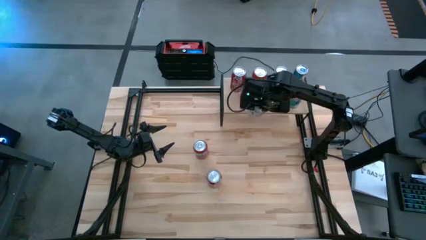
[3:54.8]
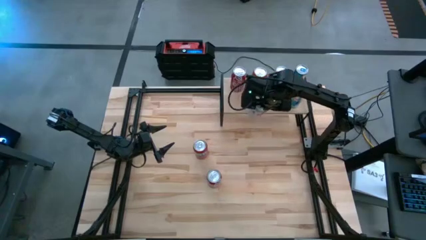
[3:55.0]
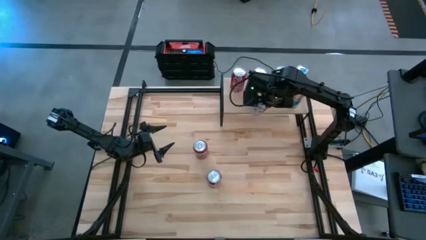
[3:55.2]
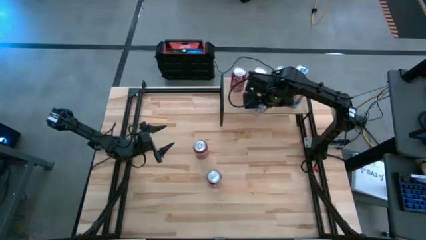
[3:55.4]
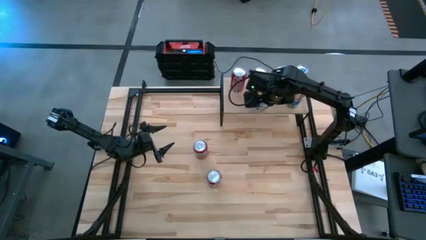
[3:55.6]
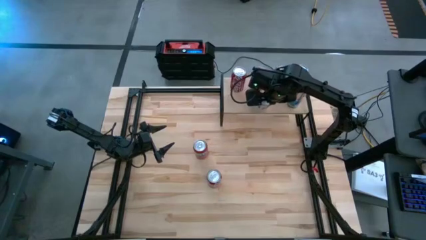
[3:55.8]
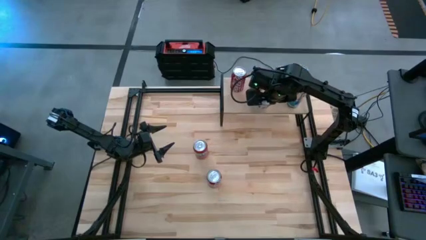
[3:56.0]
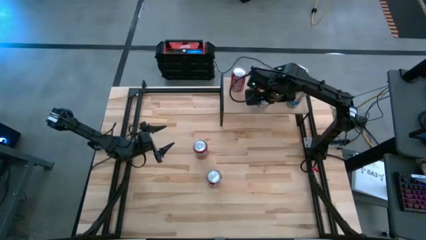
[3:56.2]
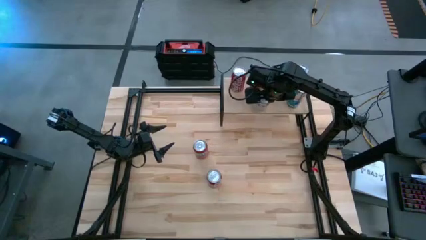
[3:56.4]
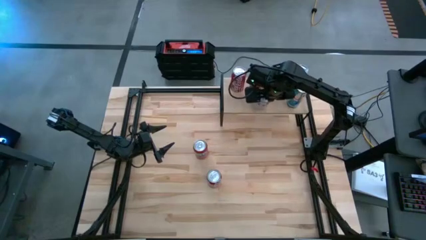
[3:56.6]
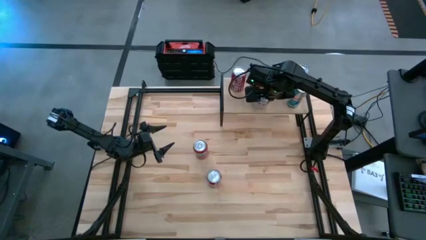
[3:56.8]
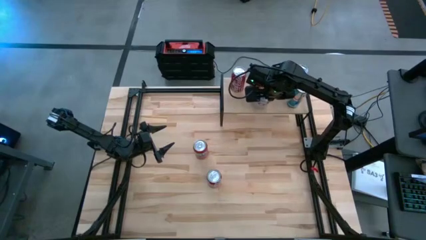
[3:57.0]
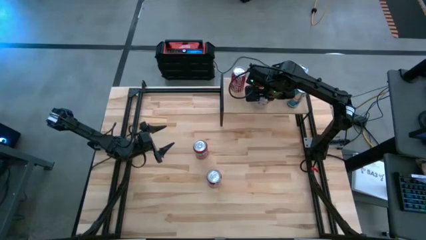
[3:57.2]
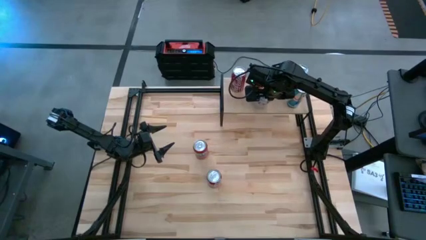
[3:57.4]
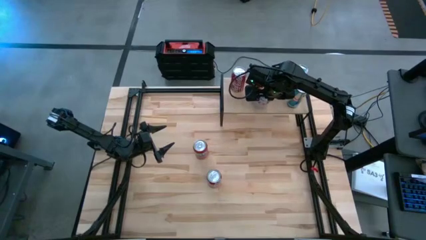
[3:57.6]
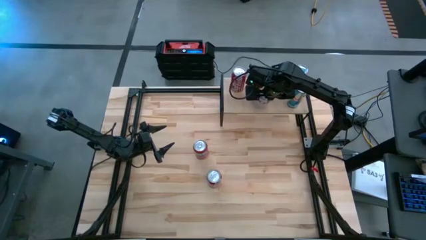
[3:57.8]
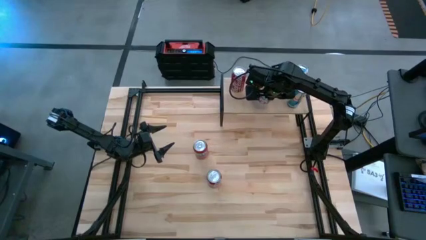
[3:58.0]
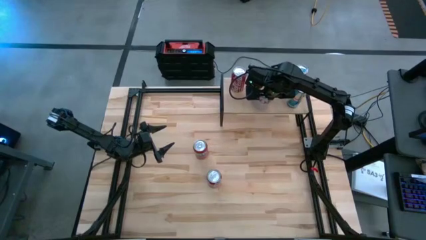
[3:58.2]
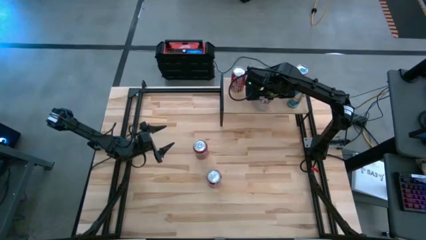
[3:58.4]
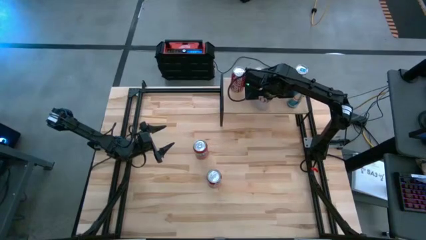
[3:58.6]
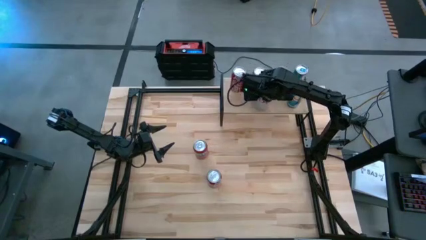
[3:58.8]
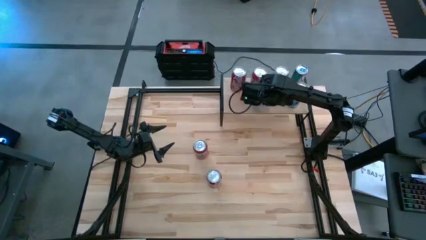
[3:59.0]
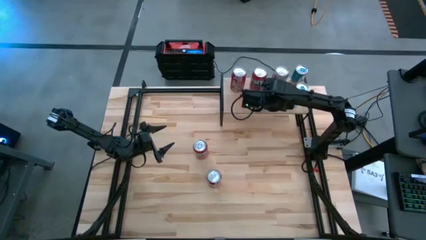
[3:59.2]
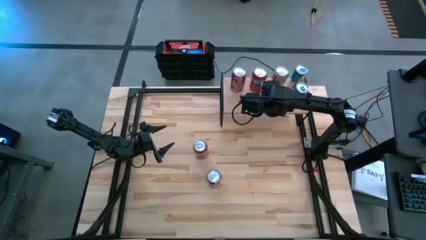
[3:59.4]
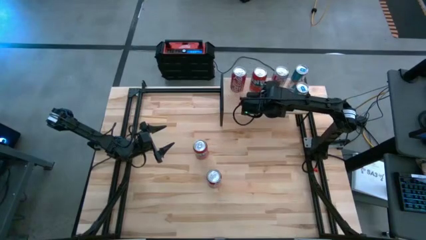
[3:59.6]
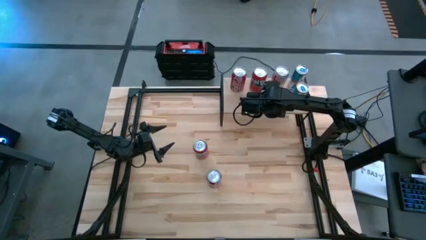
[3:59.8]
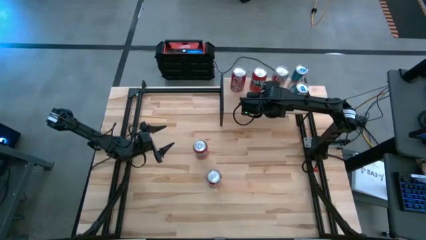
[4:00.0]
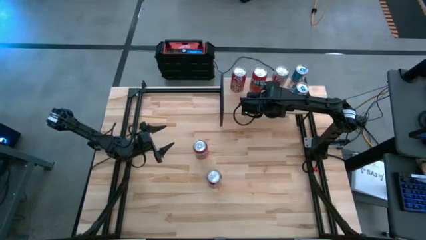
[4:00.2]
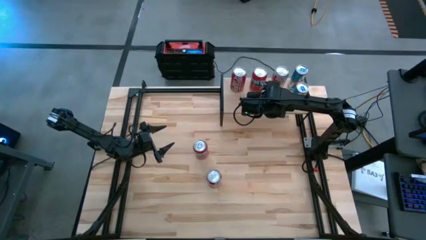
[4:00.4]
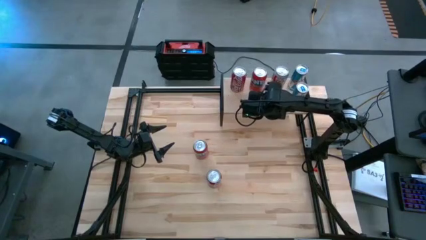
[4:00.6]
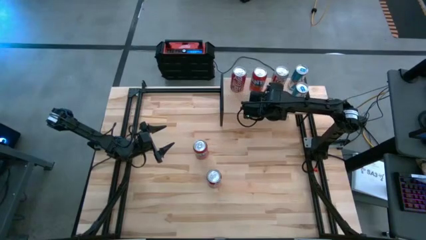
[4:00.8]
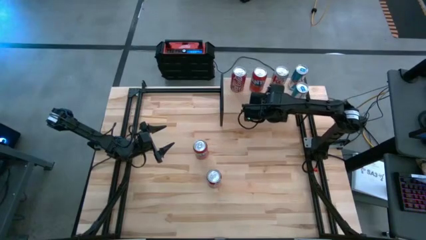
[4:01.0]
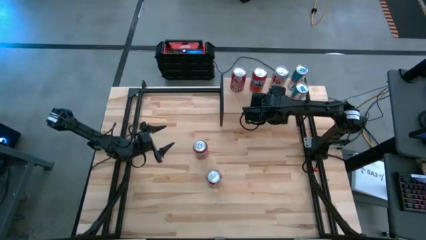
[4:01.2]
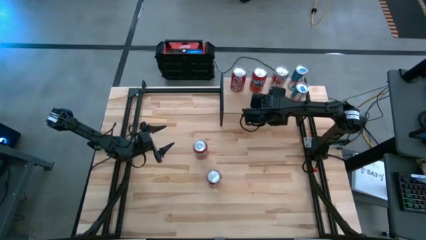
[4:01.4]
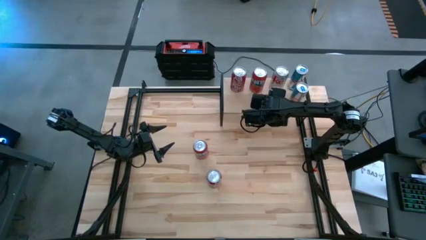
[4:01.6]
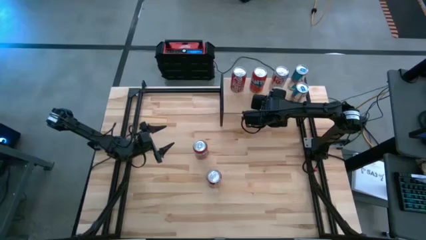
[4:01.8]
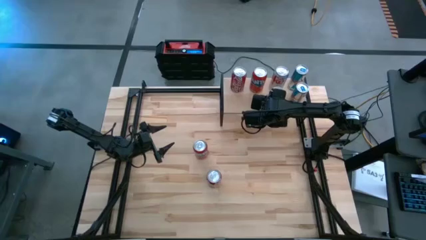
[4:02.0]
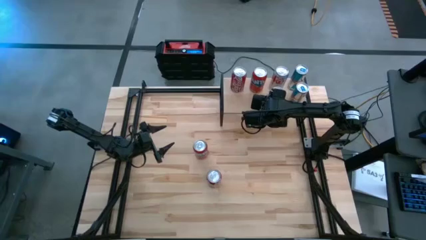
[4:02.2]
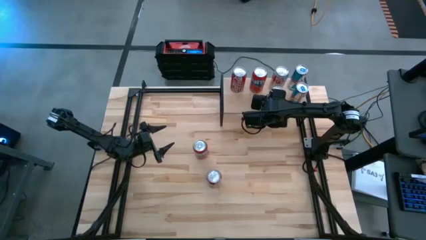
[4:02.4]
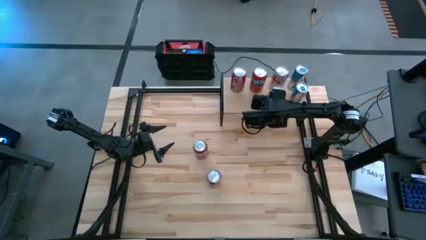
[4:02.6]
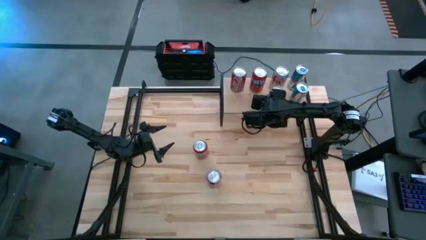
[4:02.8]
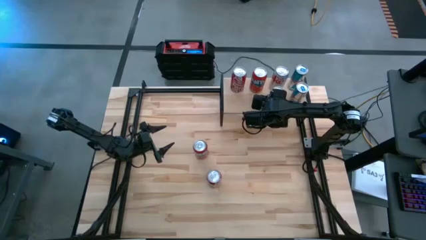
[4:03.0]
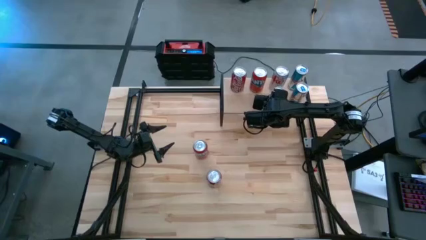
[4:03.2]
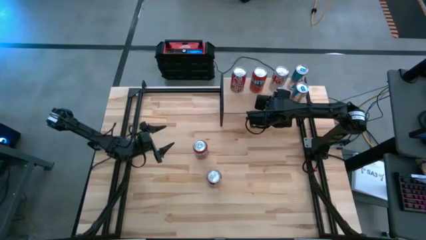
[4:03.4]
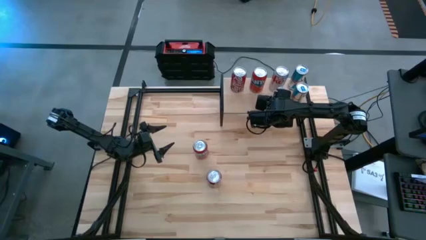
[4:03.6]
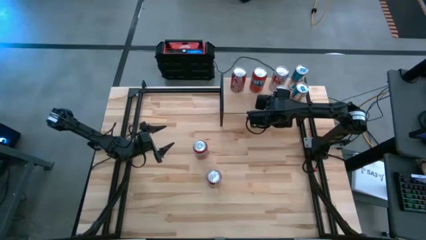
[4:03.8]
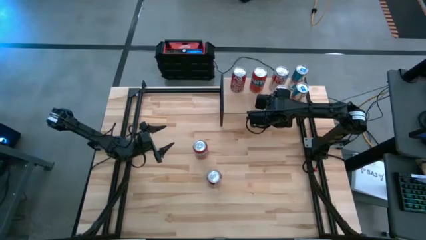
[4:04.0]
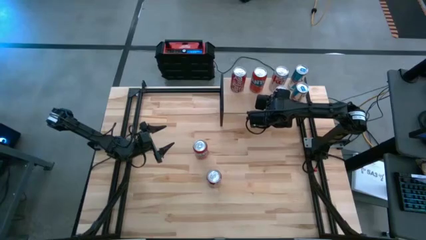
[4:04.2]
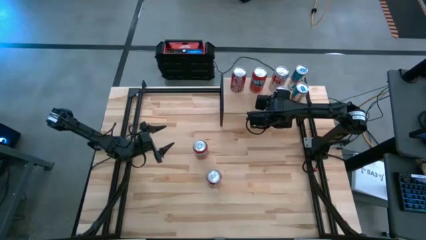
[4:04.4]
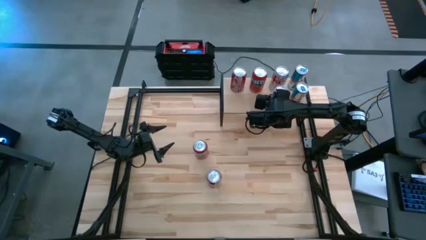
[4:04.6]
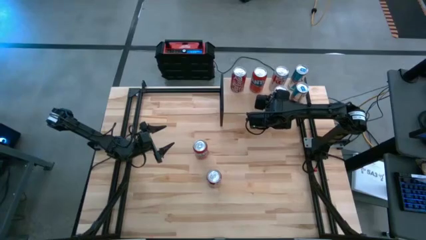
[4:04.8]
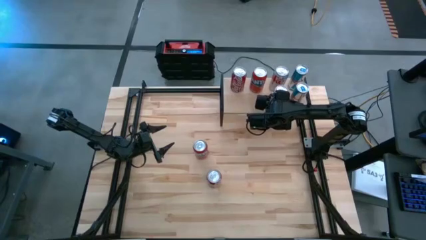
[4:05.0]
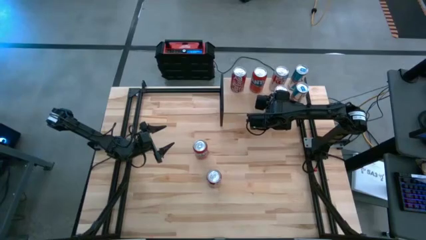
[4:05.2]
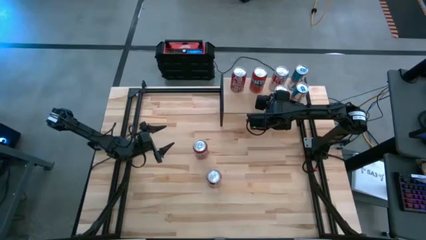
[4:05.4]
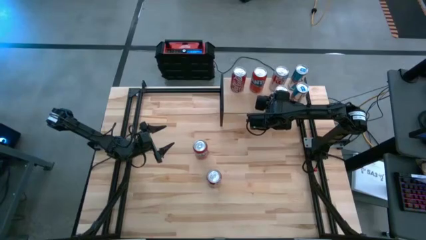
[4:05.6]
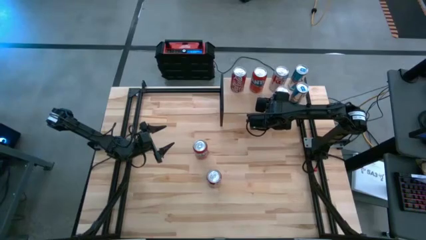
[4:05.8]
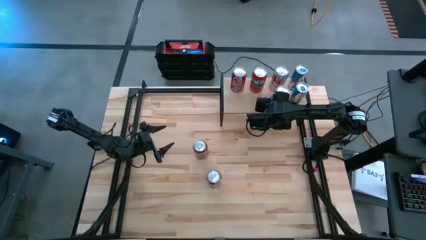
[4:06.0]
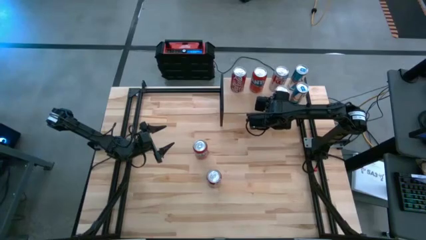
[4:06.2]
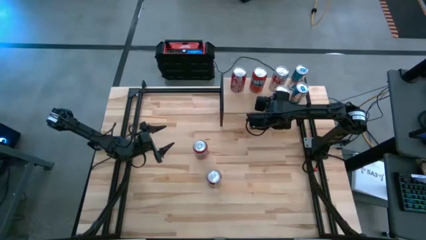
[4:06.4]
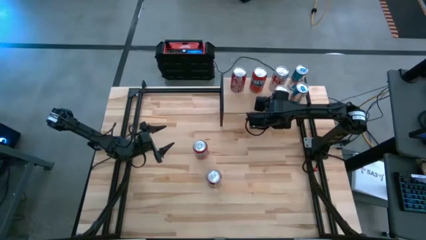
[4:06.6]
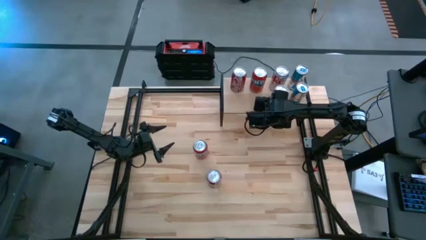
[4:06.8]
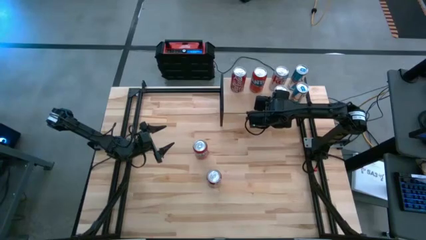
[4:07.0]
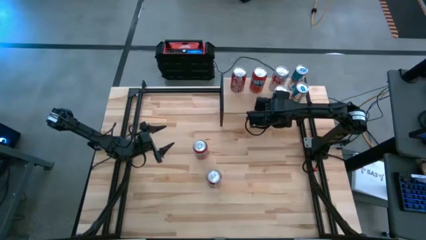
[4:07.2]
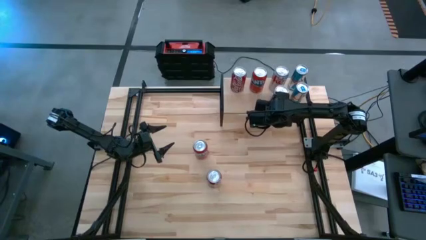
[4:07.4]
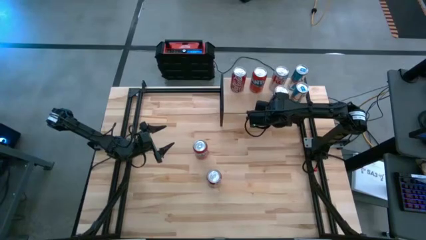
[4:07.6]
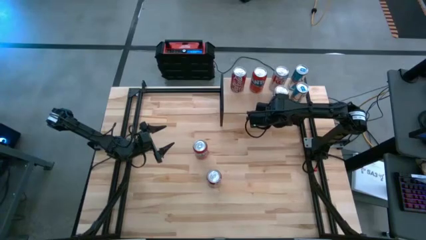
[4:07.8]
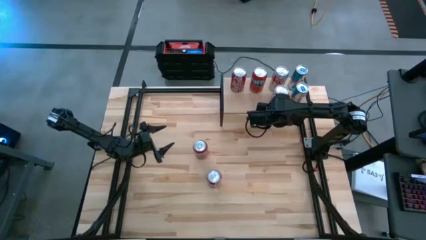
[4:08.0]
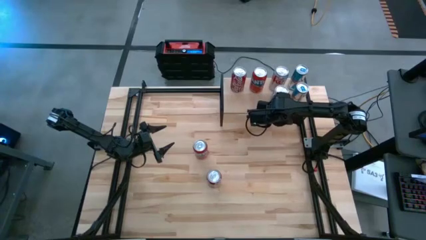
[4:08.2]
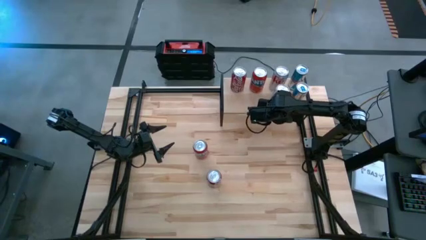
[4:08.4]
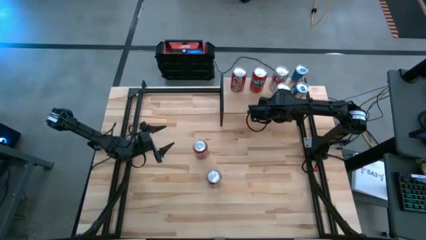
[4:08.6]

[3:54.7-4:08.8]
Task: Place canned beverage on shelf
Put the silver soda can on the shelf aligned with the other silver soda can

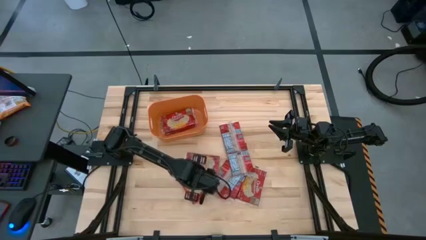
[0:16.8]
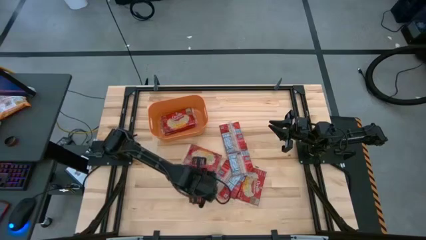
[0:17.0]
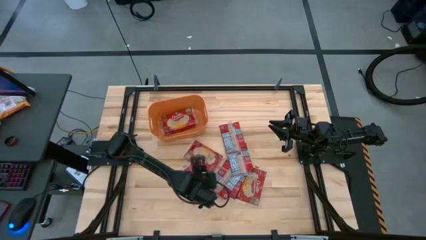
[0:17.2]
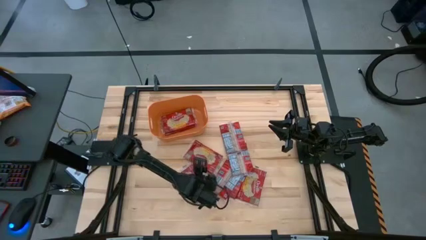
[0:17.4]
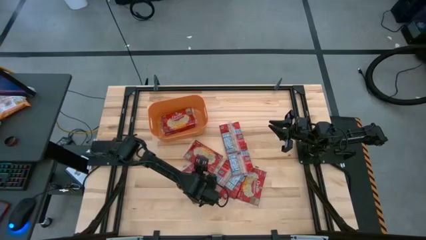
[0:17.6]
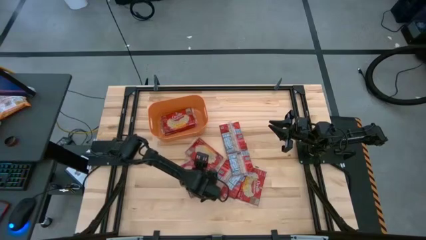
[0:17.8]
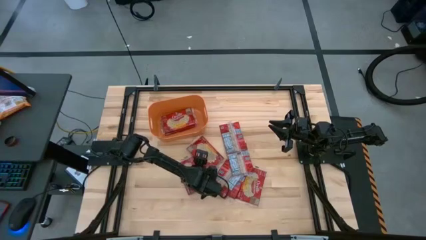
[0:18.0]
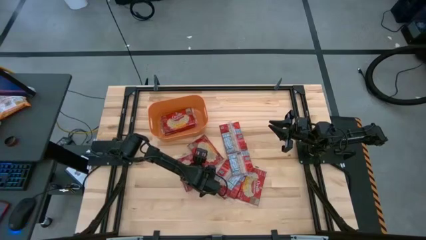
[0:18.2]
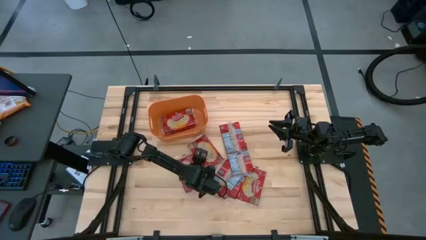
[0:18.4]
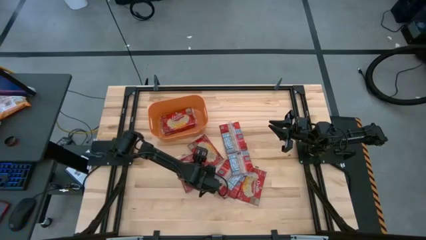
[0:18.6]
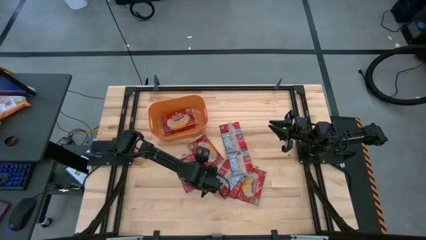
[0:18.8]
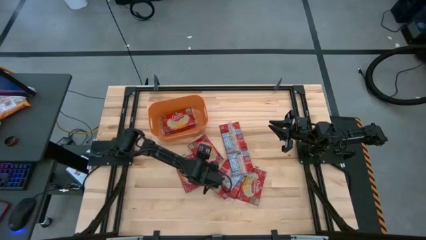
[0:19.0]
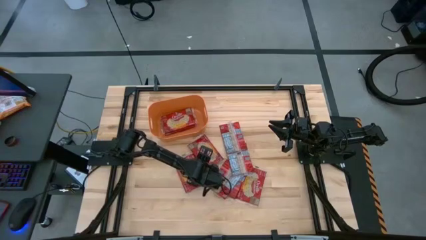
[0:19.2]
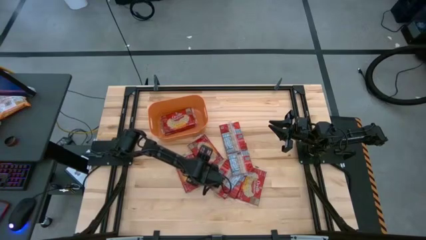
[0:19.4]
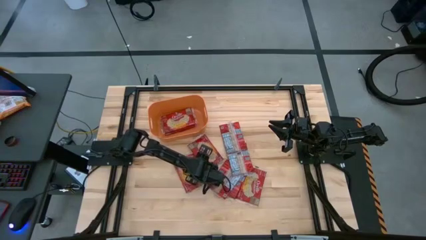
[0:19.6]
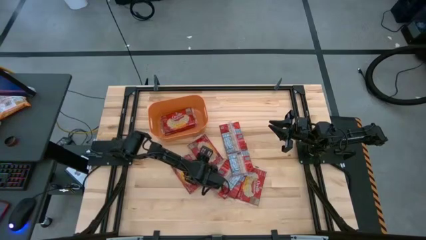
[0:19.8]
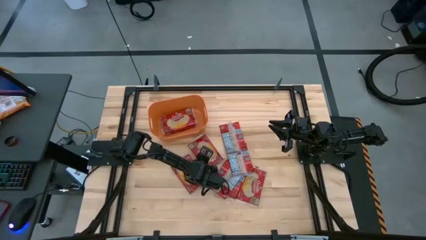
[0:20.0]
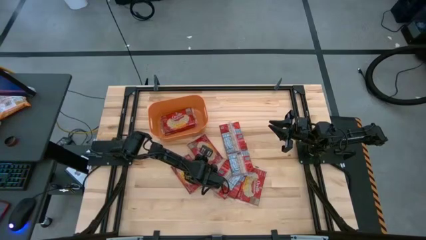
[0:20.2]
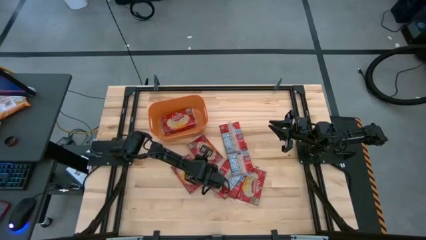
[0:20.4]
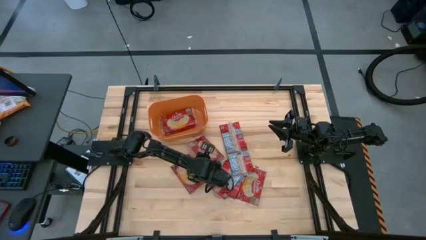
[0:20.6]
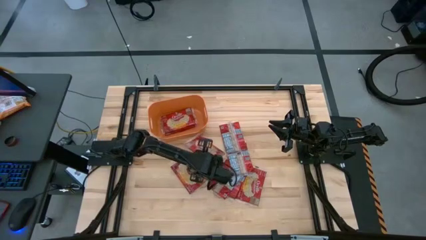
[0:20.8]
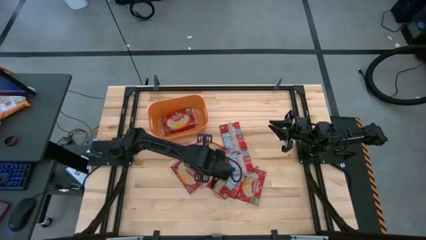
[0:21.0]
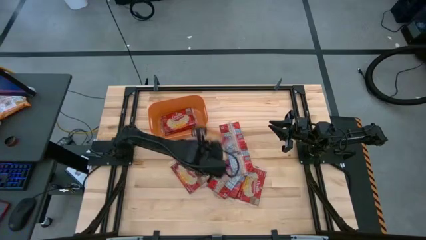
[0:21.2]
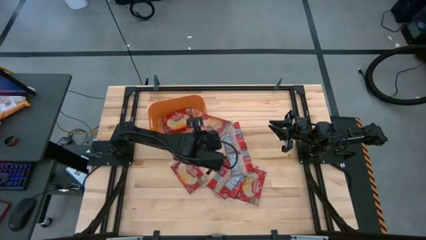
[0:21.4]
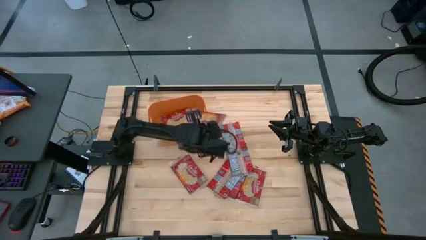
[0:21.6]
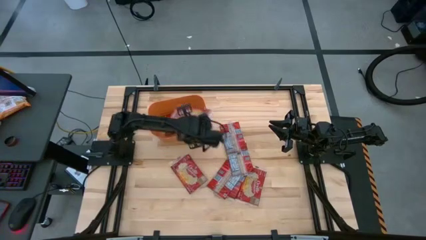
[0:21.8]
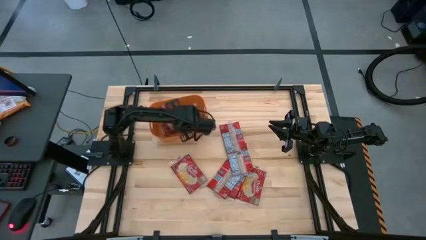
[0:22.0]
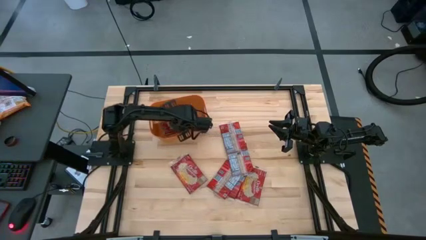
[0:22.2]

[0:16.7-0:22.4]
Task: Sort popcorn bags into baskets
Put the red popcorn bag into the orange container
